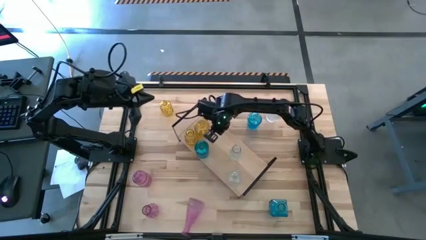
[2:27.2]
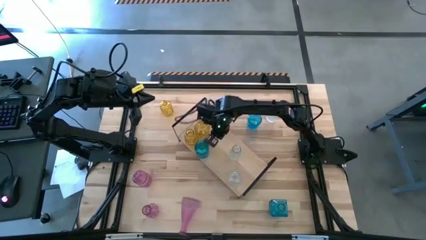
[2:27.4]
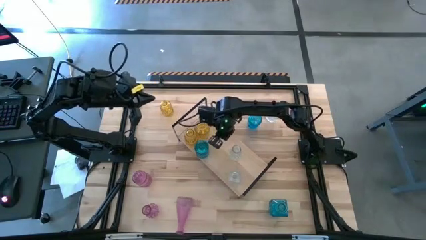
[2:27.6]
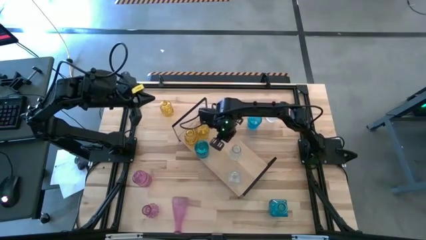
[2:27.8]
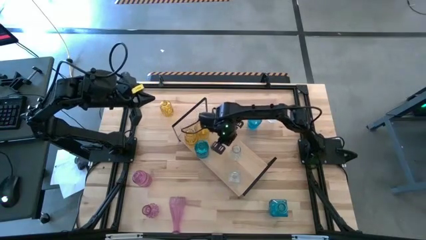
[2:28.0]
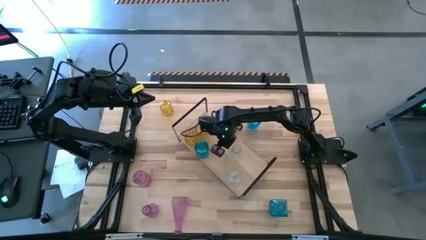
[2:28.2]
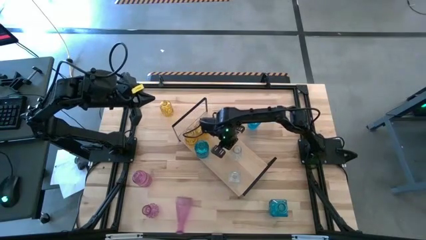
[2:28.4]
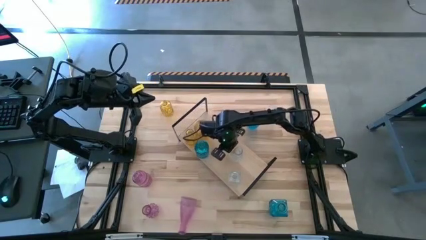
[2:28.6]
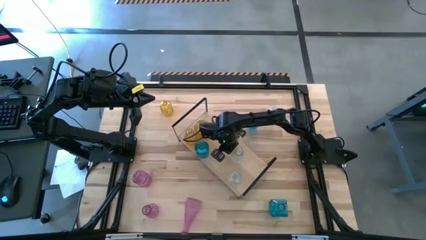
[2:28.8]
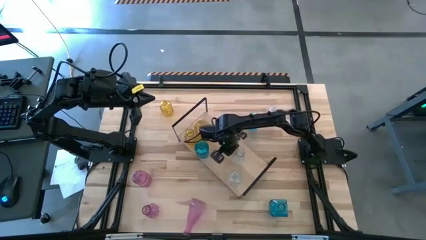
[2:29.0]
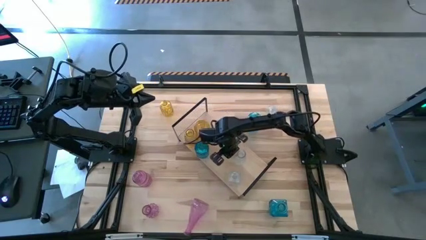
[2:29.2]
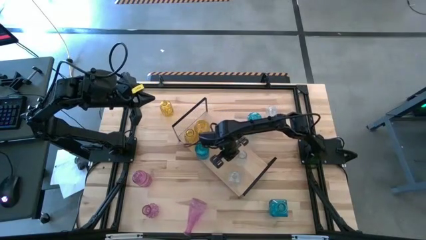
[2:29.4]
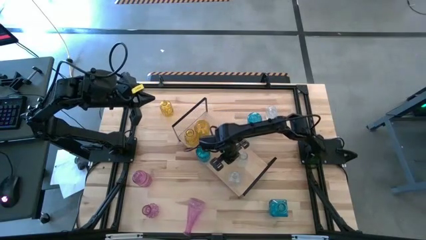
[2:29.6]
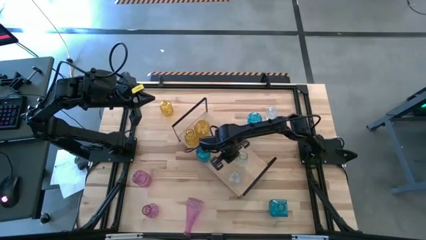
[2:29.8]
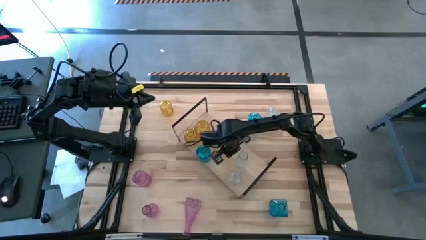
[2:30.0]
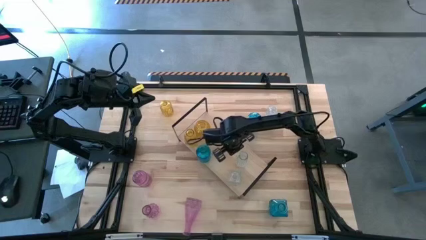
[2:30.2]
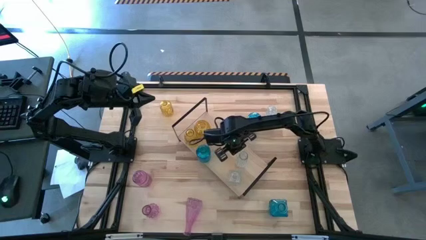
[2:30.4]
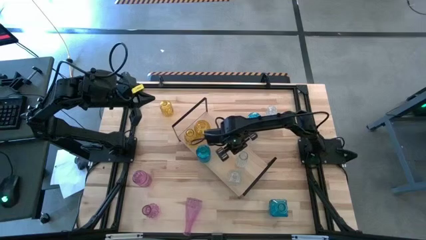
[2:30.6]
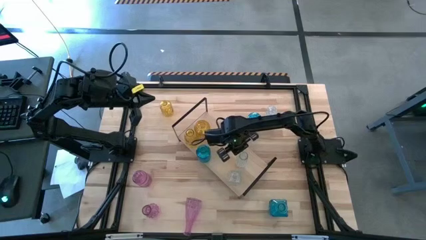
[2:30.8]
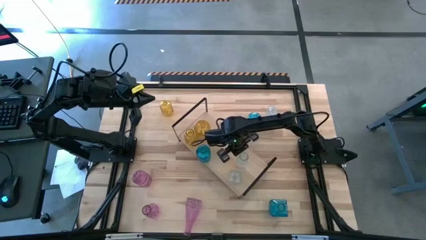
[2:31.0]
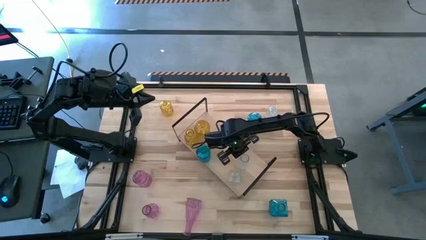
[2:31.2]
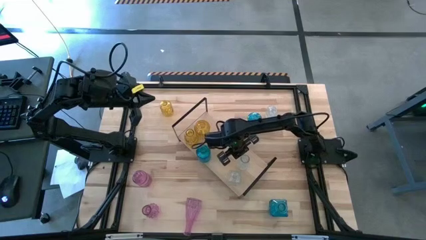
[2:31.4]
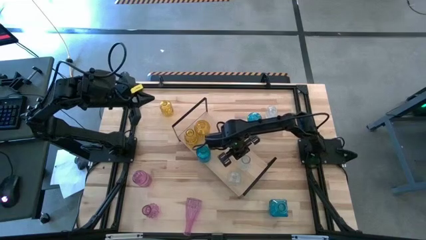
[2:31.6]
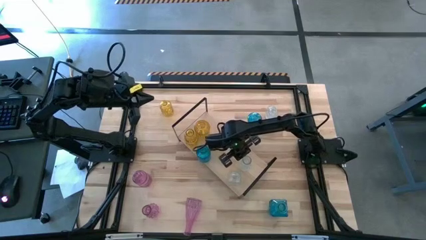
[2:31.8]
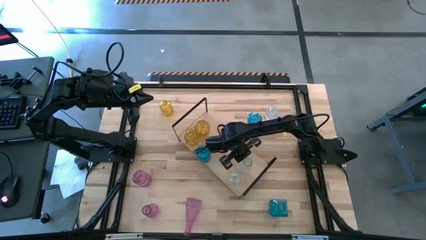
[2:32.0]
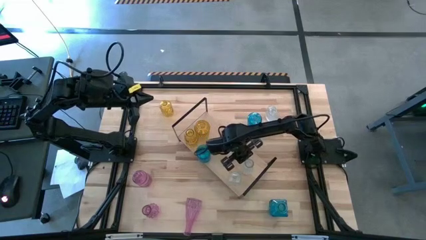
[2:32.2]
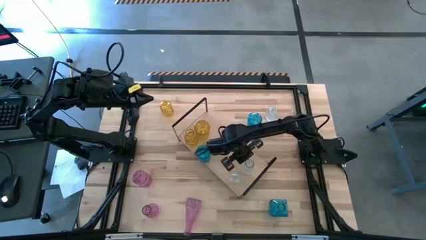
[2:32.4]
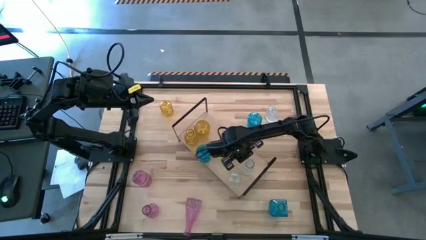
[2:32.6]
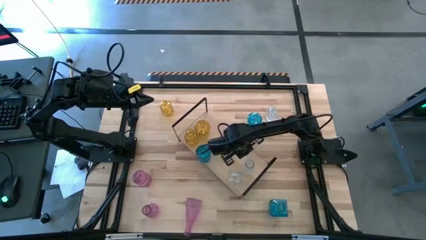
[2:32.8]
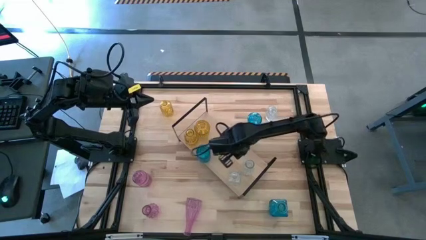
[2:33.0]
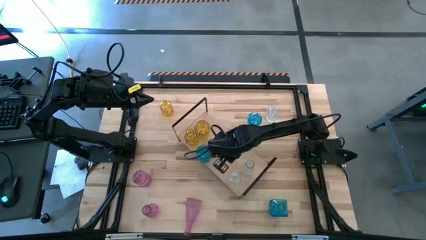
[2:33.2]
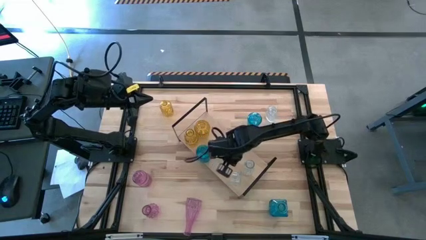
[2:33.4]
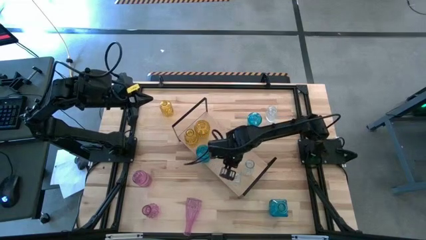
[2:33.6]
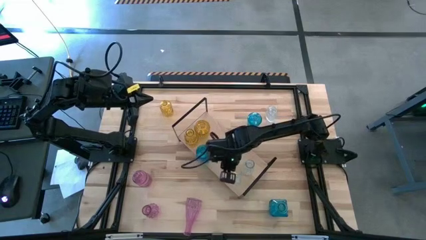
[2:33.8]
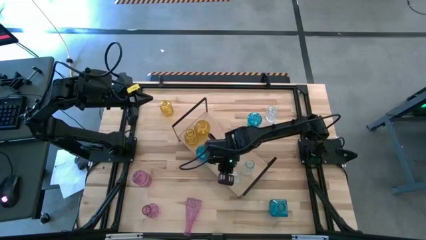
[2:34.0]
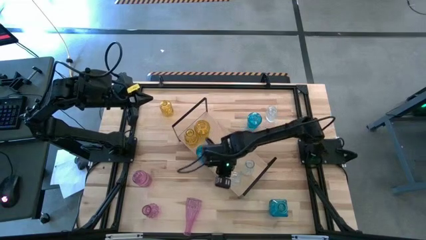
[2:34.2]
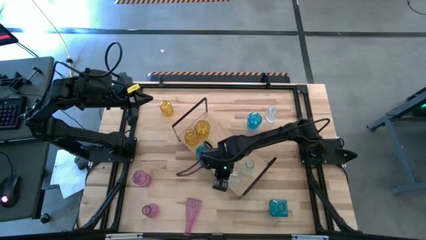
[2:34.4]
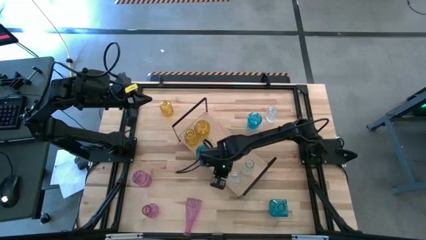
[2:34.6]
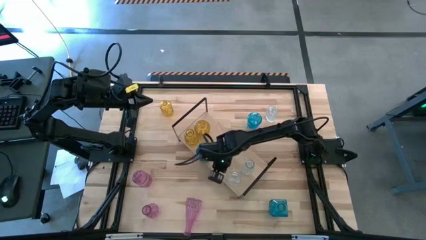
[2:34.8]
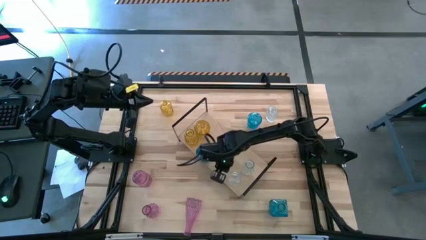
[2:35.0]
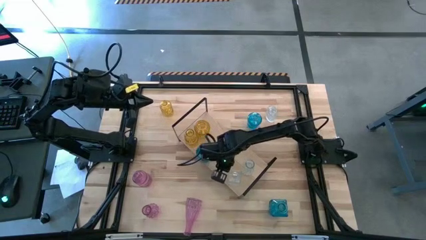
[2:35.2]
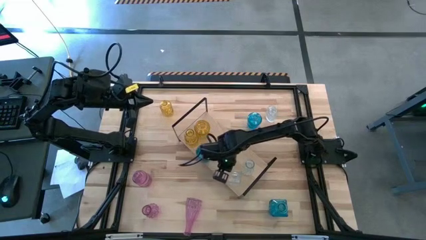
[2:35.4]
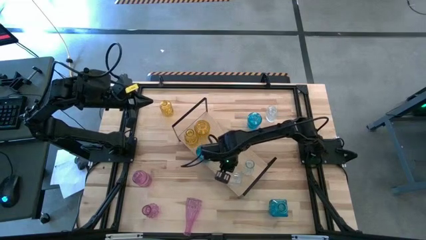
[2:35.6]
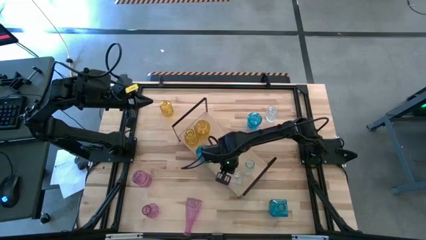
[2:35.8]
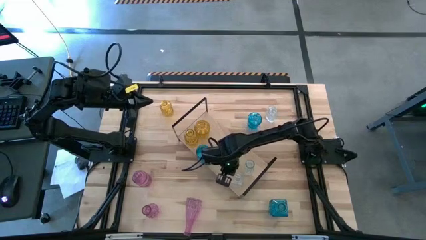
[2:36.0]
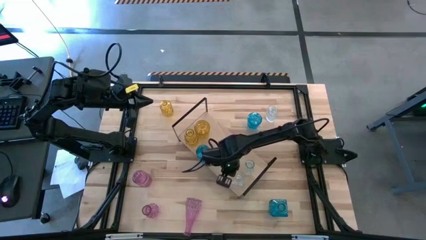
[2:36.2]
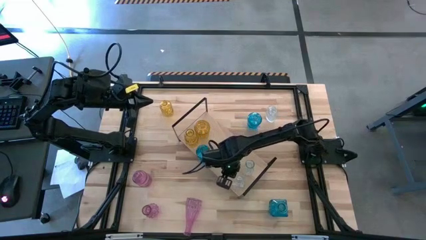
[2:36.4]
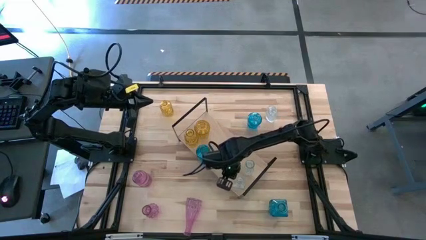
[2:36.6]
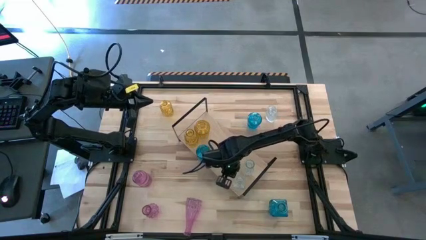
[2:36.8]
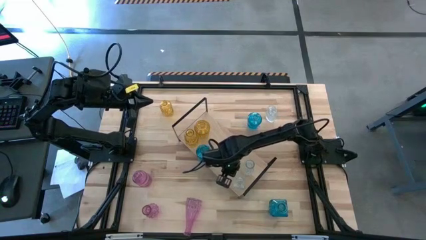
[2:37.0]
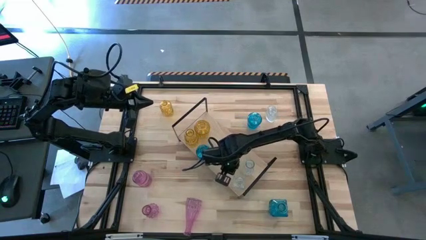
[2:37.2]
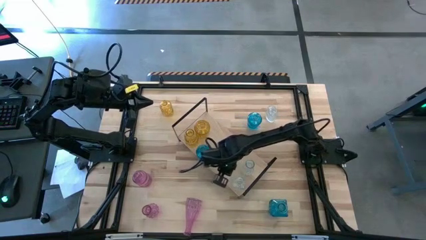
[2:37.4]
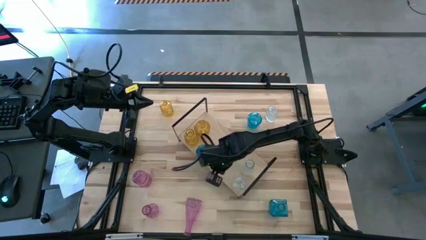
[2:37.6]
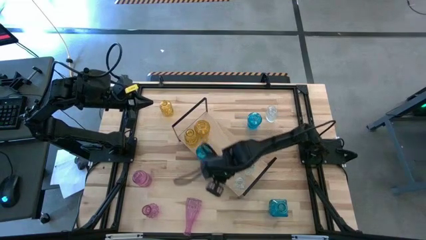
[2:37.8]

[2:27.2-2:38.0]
Task: sort vases onto shelf
Adjust the crystal vases on the shelf
